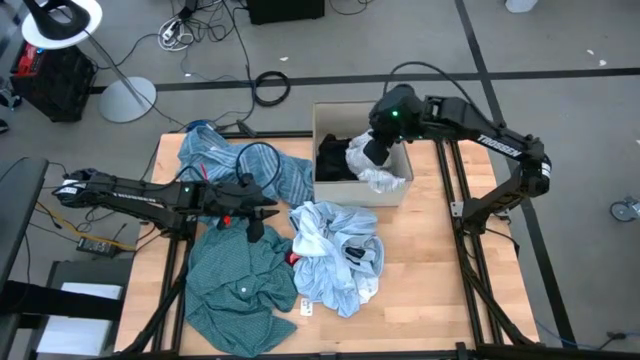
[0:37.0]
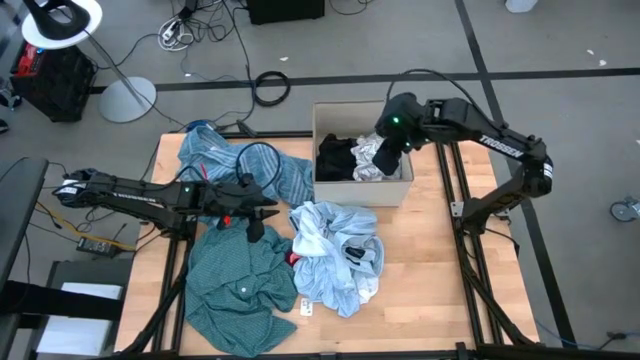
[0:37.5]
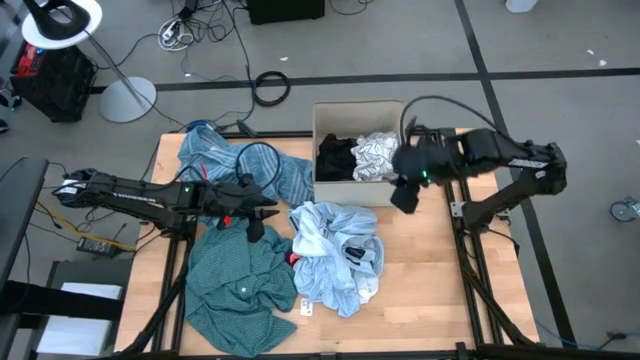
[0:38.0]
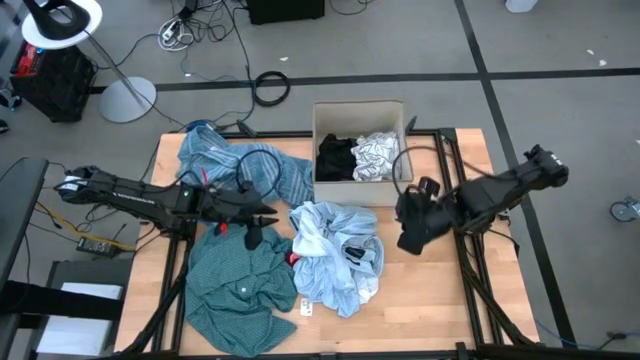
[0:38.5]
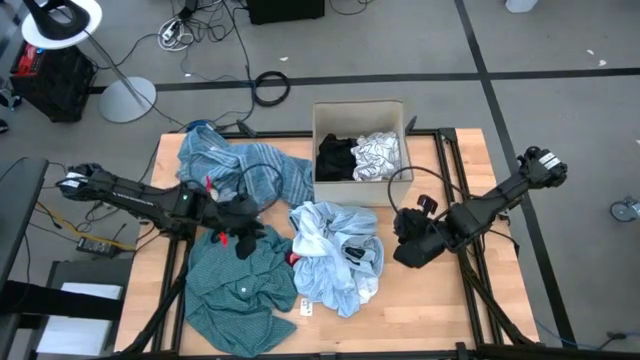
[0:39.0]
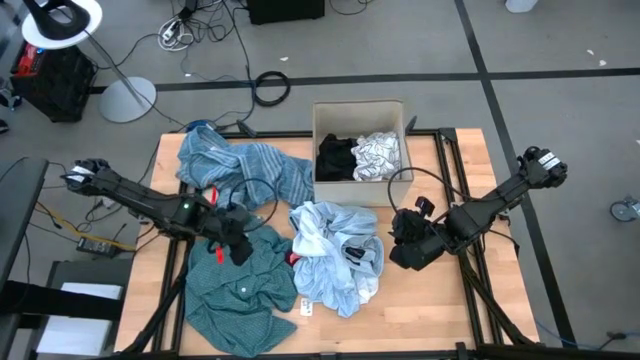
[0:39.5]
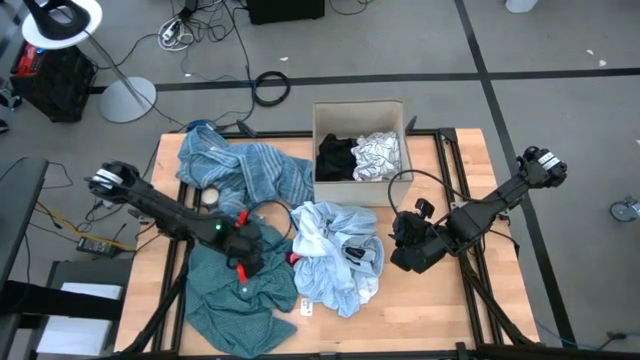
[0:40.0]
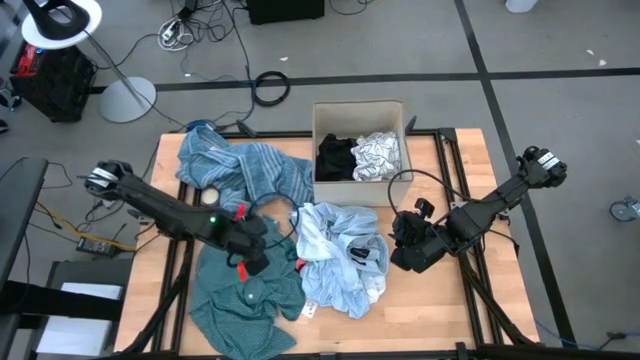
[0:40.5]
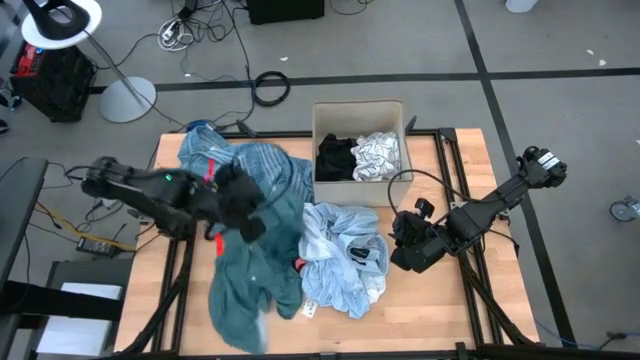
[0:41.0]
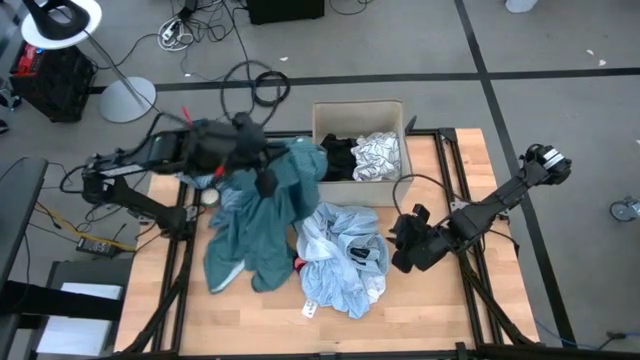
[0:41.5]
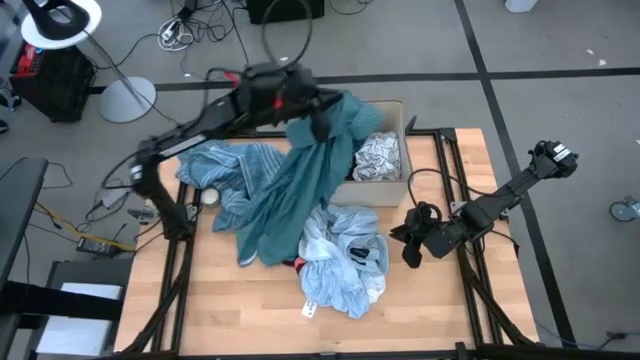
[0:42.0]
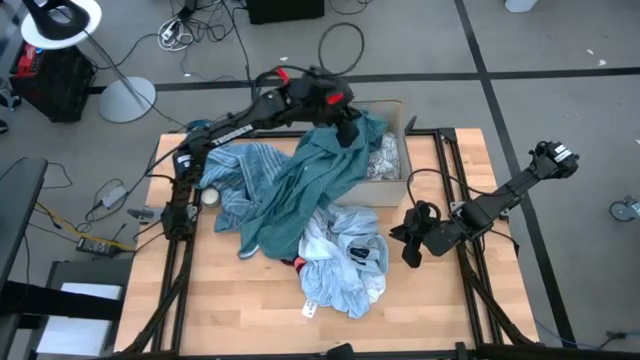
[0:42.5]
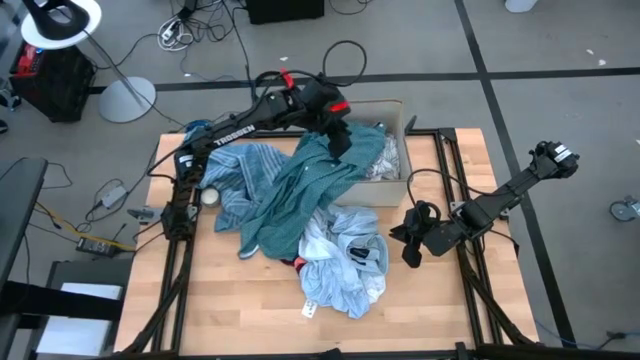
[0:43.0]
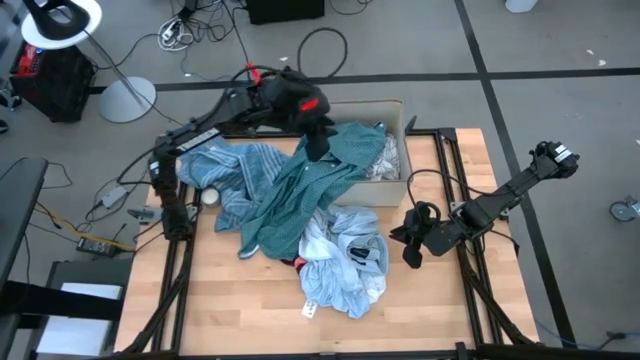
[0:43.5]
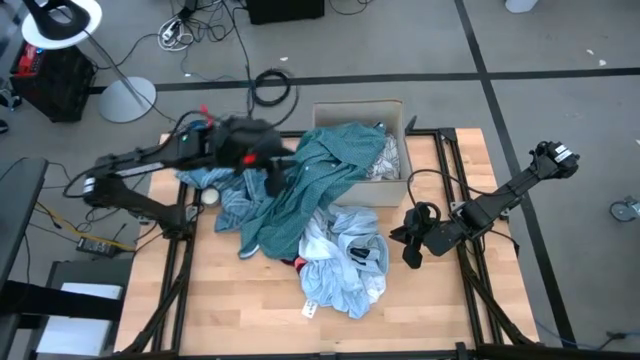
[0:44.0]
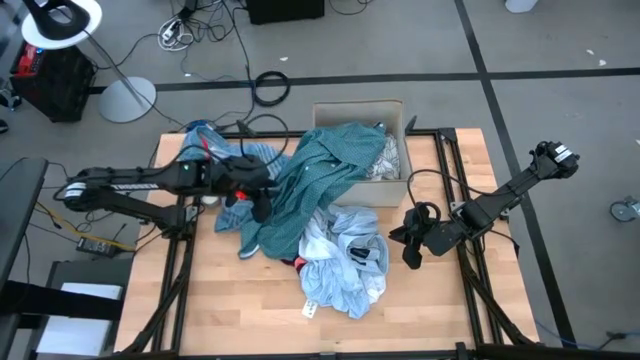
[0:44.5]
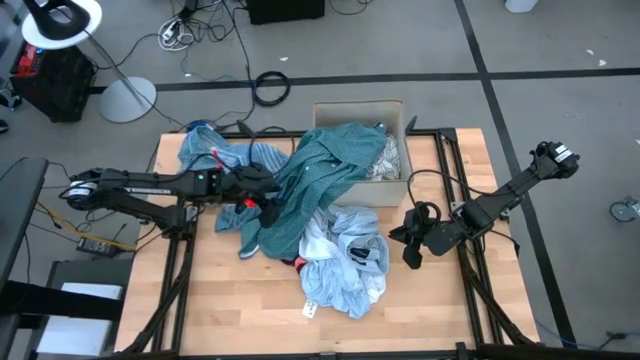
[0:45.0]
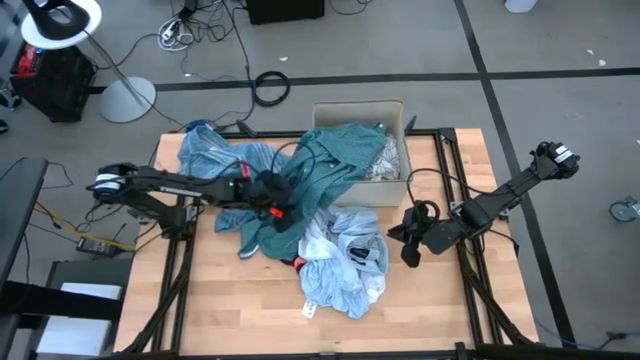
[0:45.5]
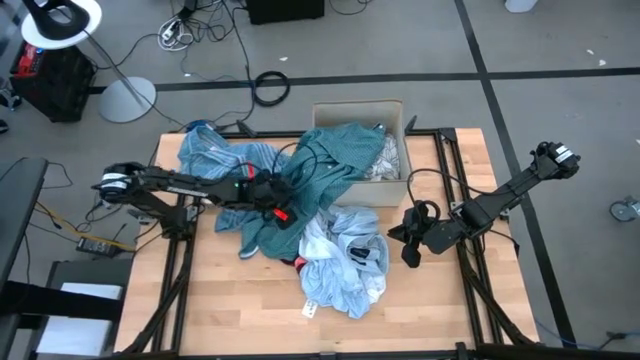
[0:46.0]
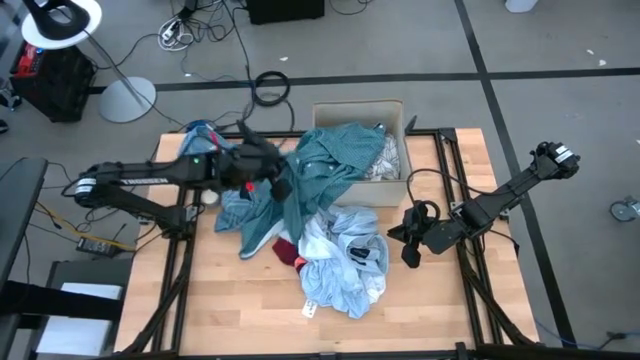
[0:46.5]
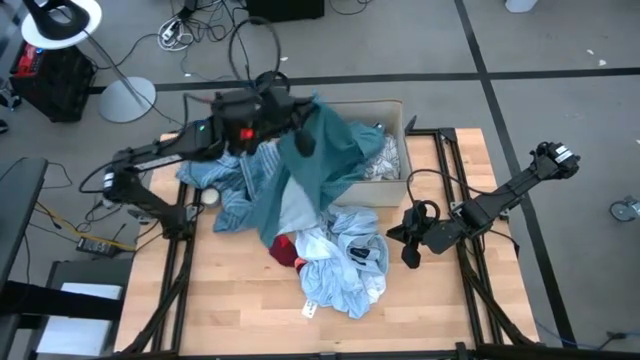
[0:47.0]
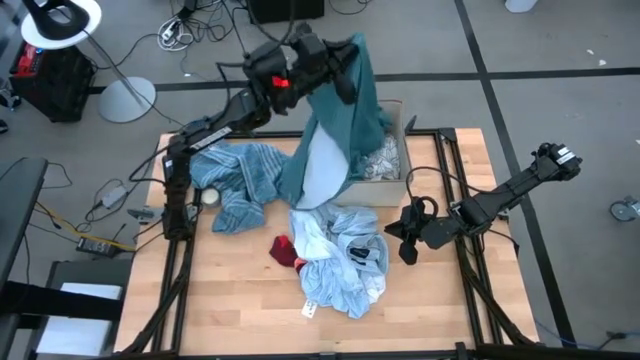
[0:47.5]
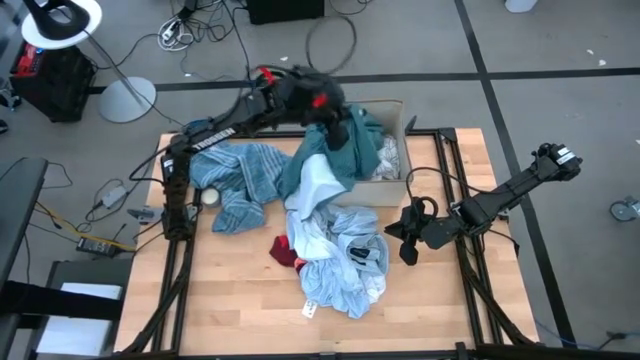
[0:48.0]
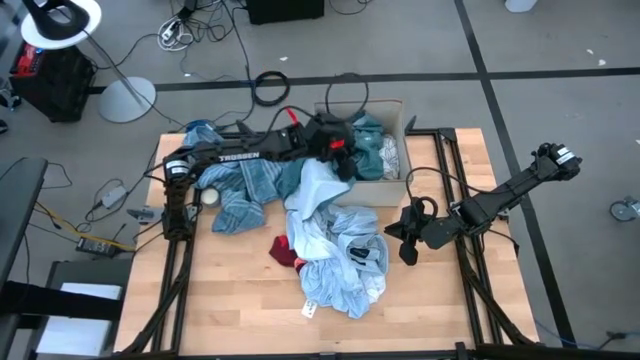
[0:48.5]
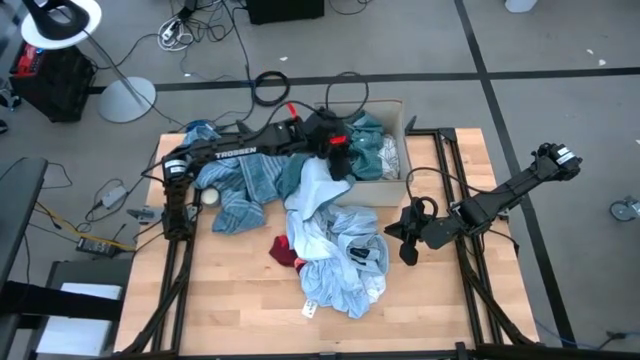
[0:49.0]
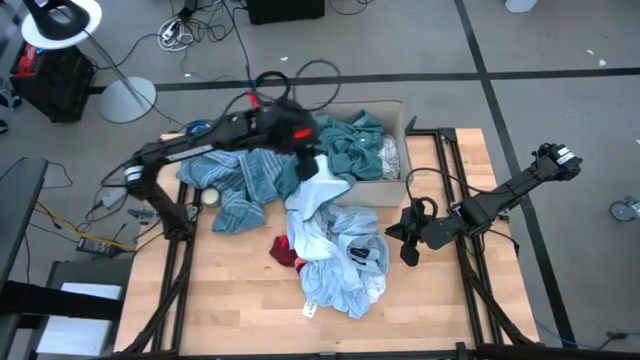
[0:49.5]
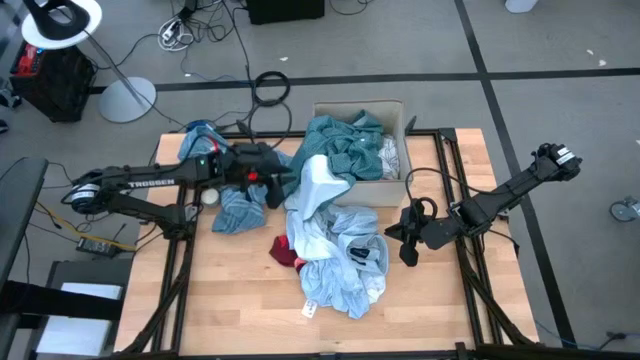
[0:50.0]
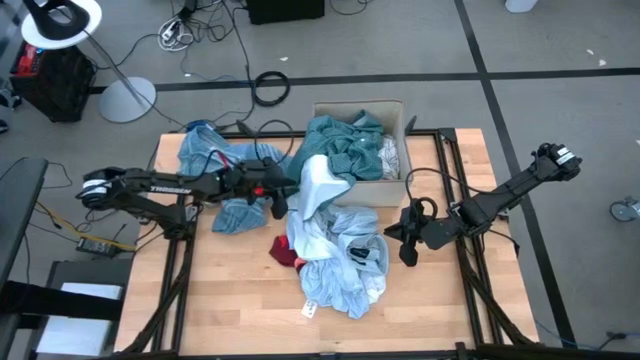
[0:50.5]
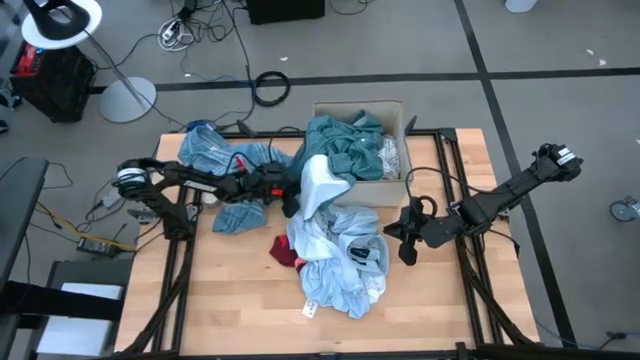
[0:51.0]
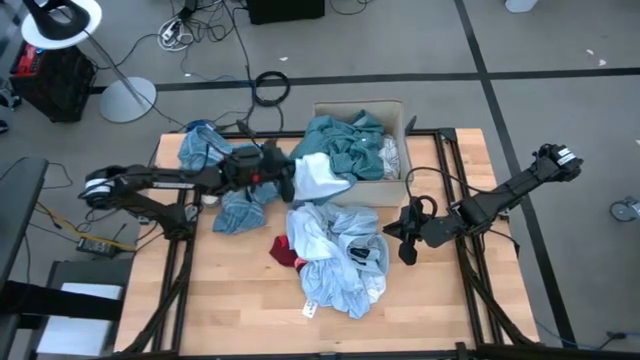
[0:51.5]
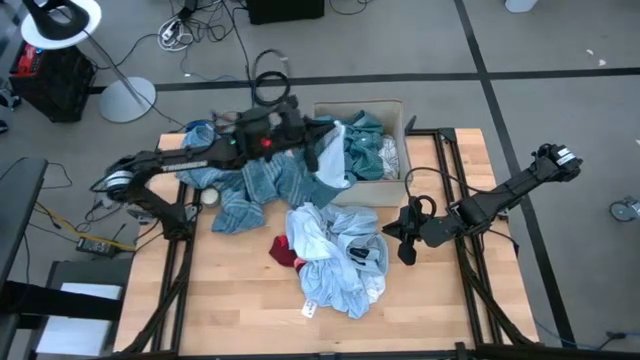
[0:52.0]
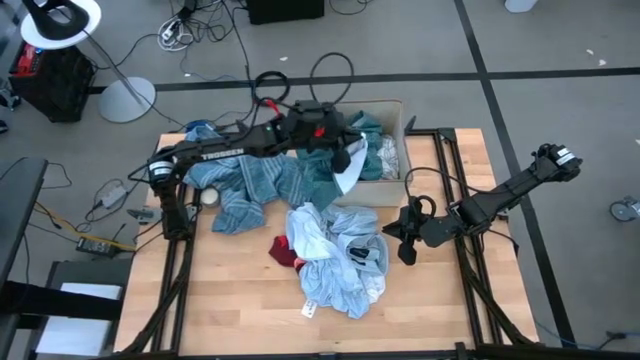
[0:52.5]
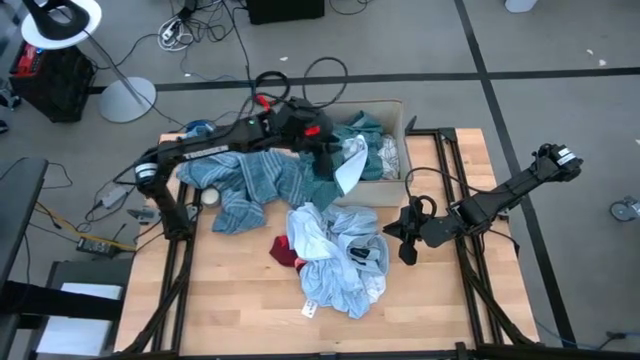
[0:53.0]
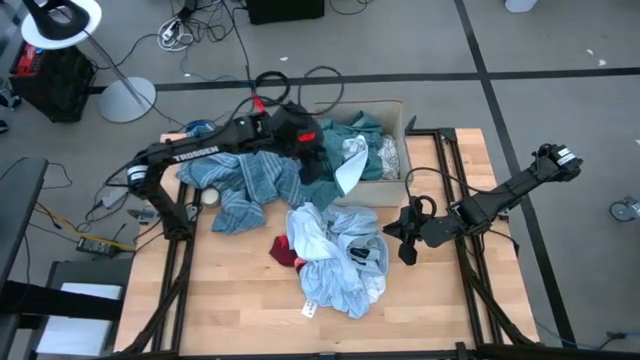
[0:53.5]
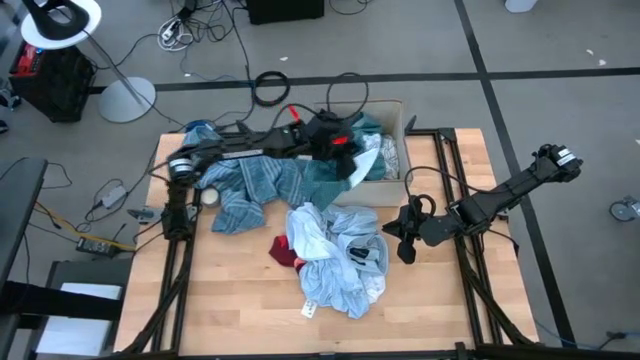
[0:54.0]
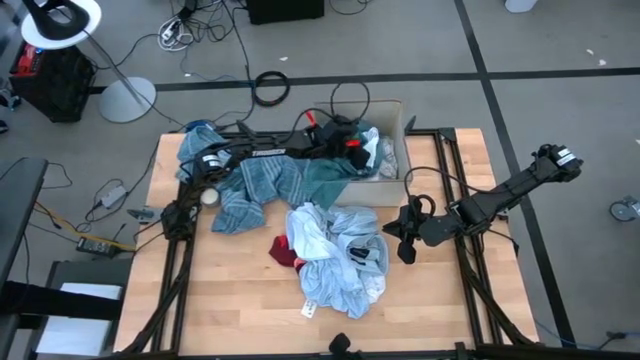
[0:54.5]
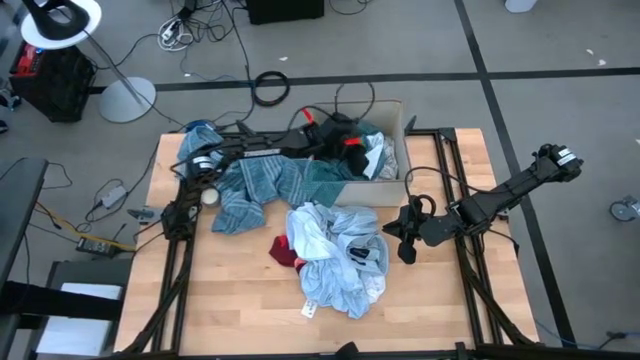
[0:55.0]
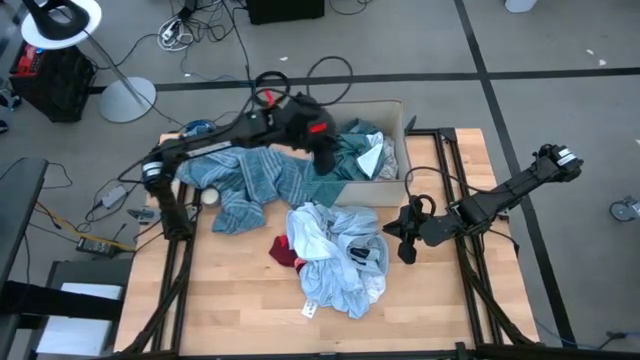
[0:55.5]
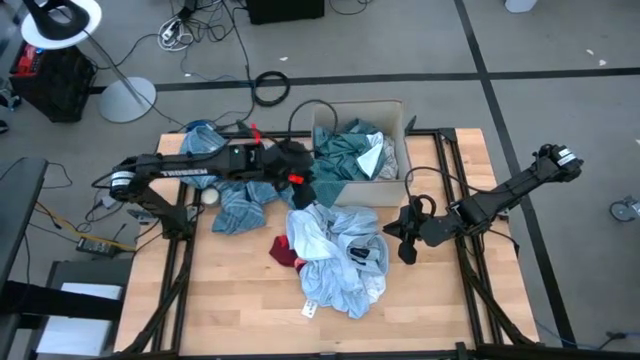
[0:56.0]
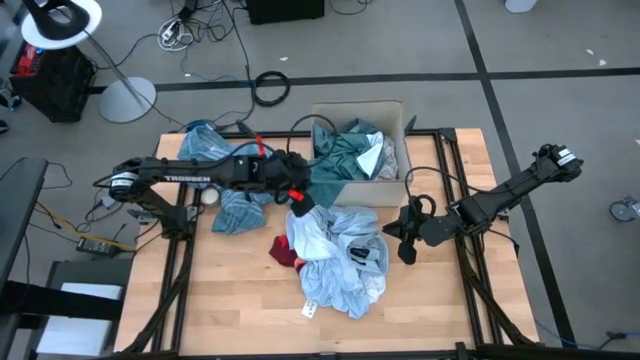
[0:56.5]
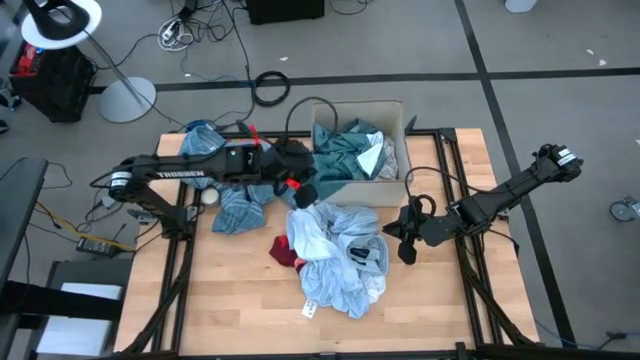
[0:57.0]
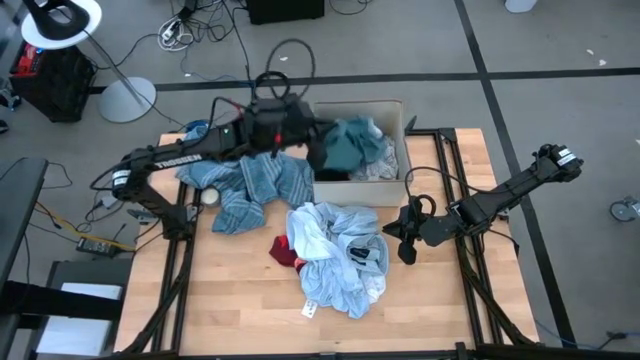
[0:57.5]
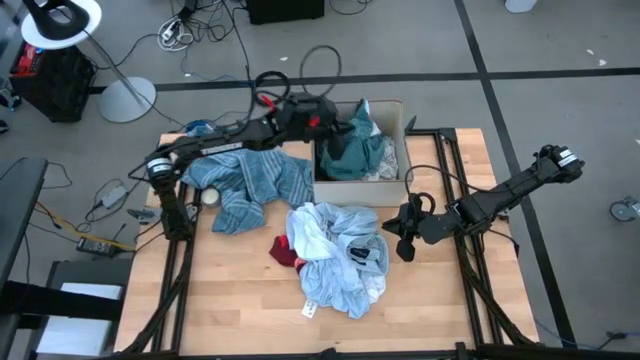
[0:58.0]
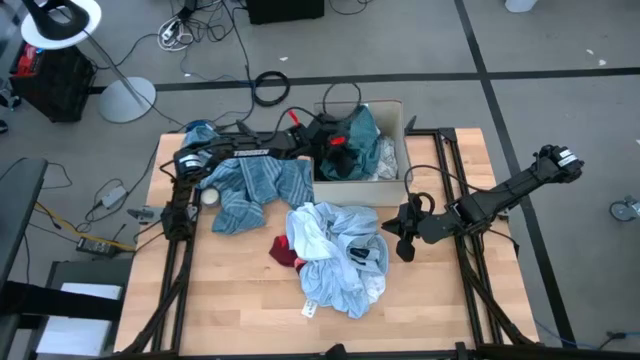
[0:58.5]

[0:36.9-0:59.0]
Task: Sort clothes
Put the green polo shirt into the gray laundry bin
